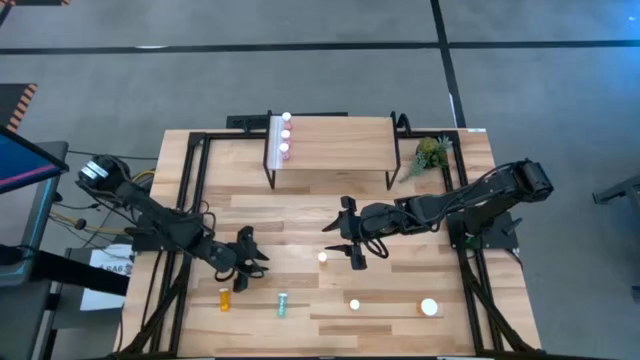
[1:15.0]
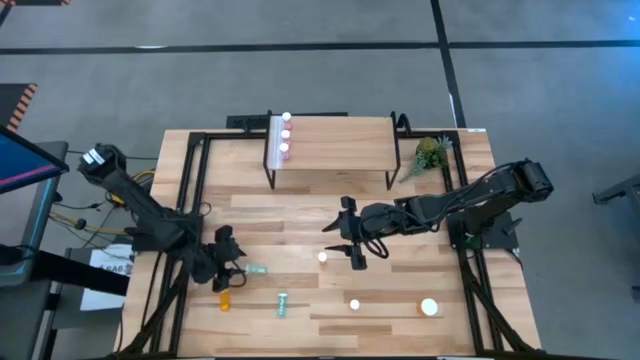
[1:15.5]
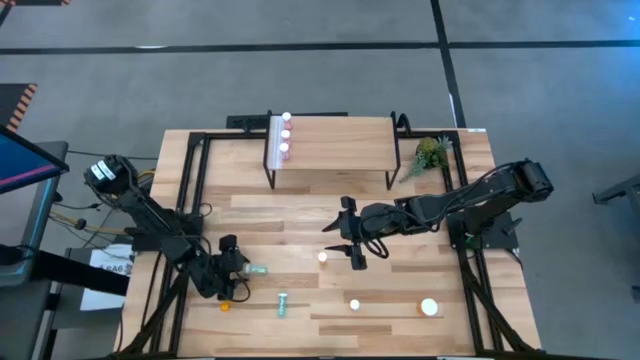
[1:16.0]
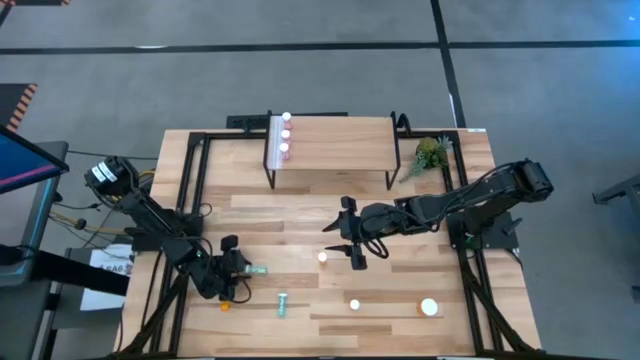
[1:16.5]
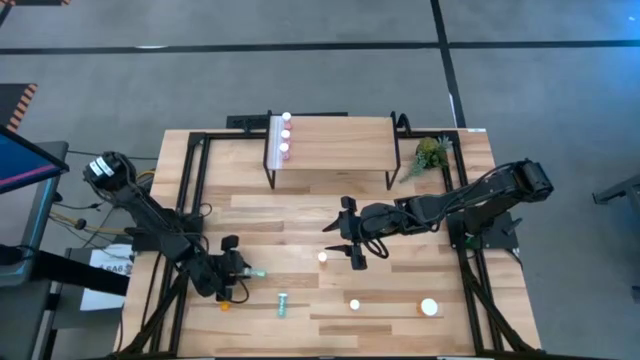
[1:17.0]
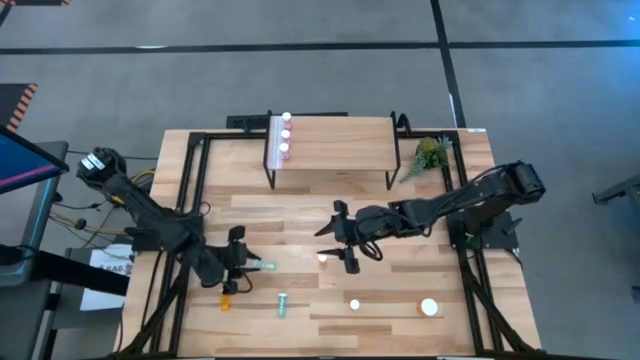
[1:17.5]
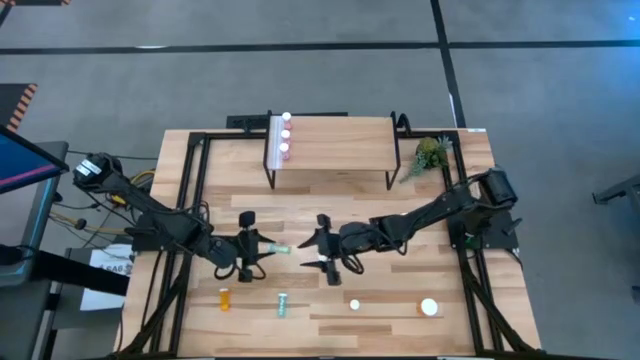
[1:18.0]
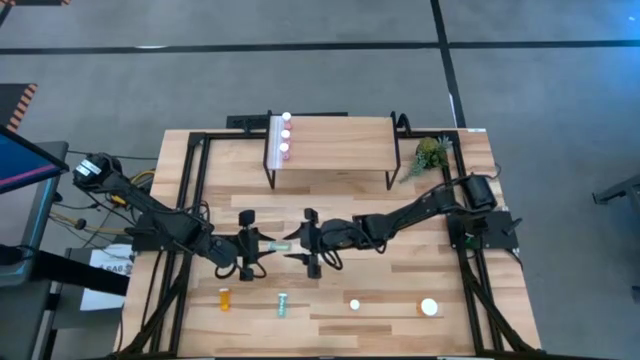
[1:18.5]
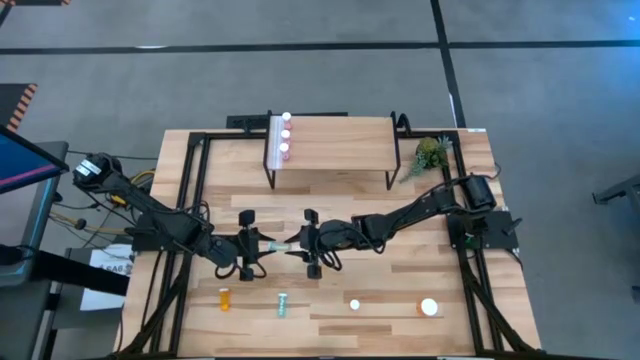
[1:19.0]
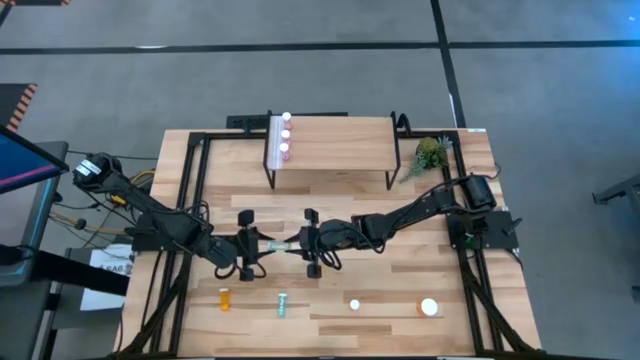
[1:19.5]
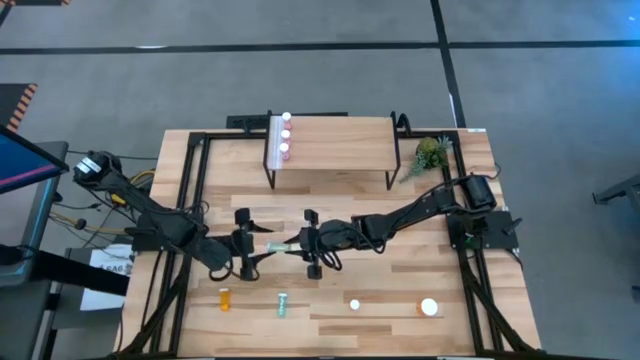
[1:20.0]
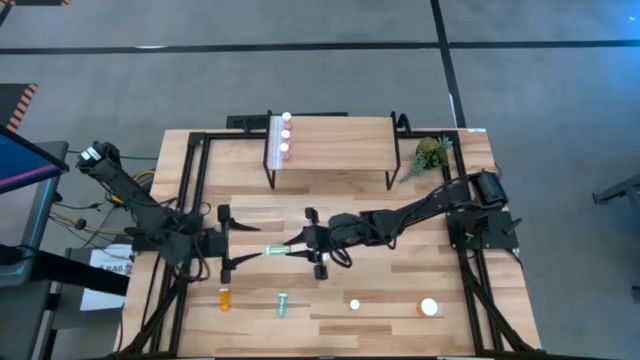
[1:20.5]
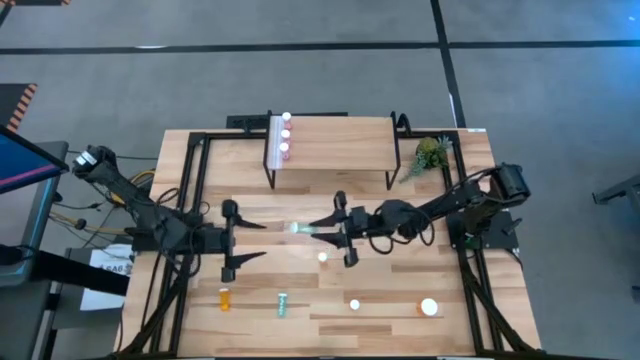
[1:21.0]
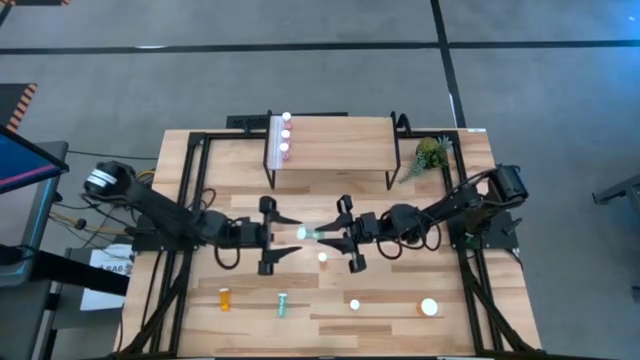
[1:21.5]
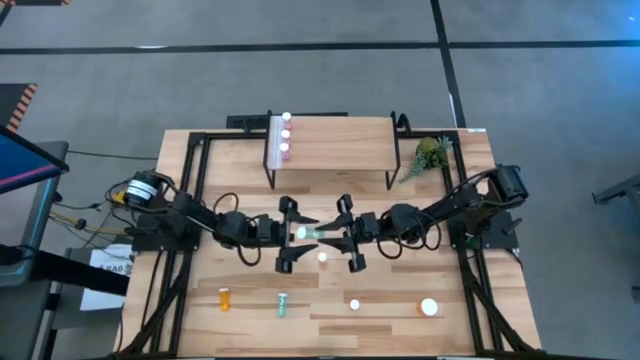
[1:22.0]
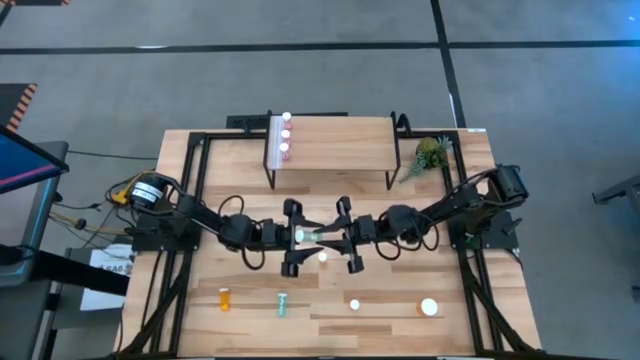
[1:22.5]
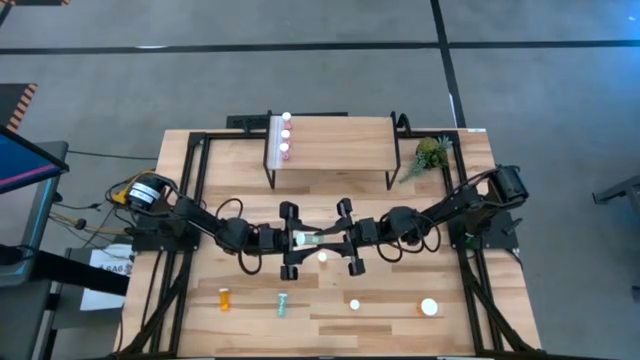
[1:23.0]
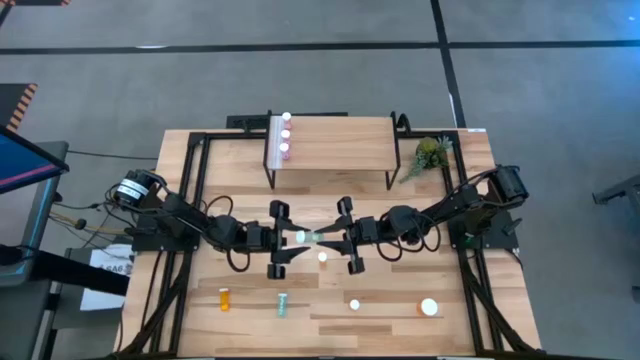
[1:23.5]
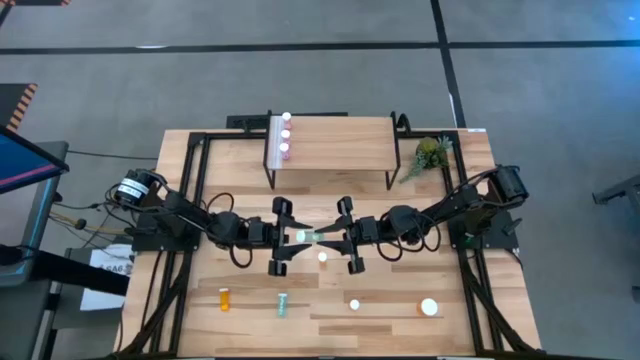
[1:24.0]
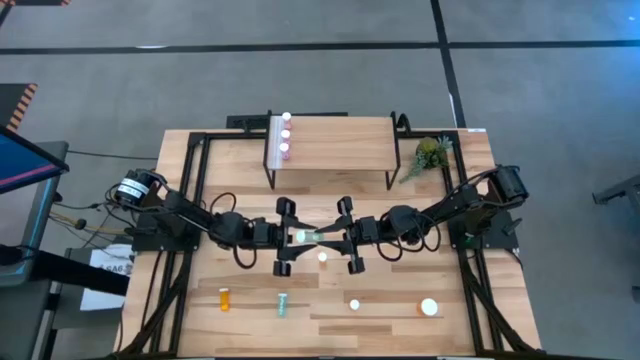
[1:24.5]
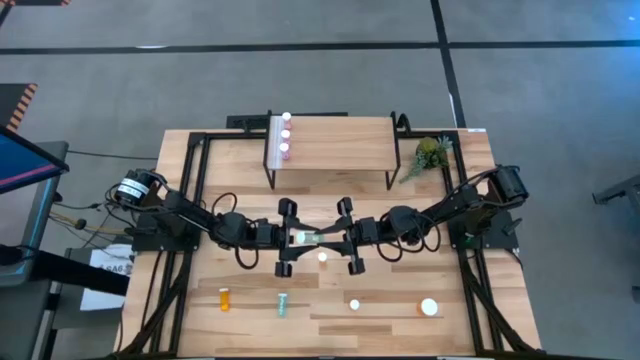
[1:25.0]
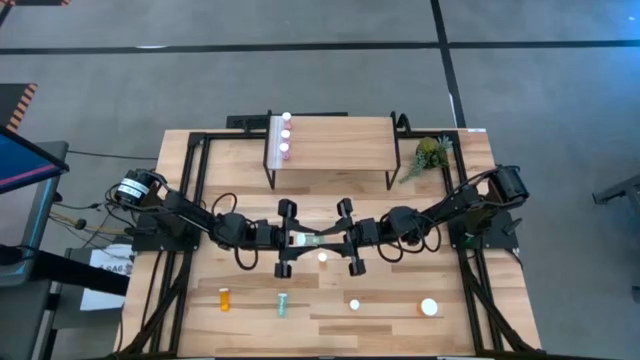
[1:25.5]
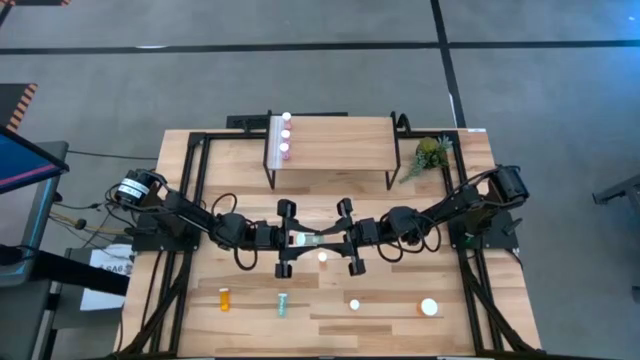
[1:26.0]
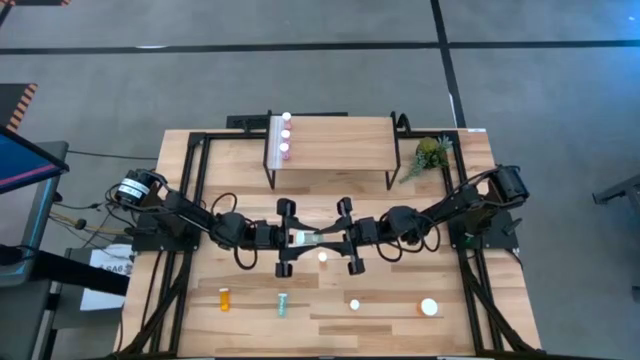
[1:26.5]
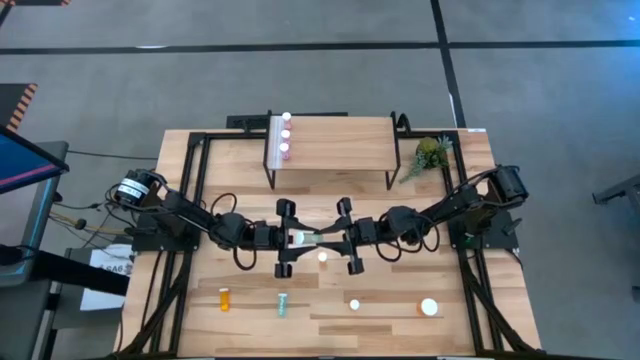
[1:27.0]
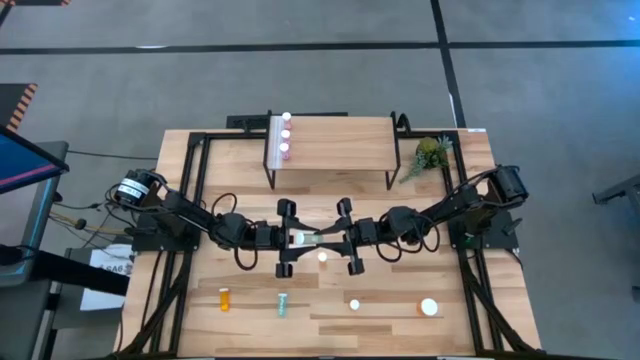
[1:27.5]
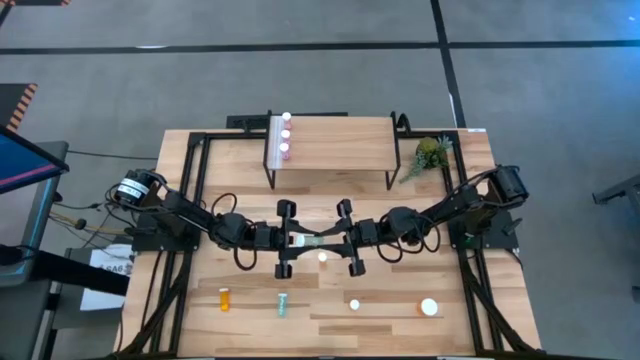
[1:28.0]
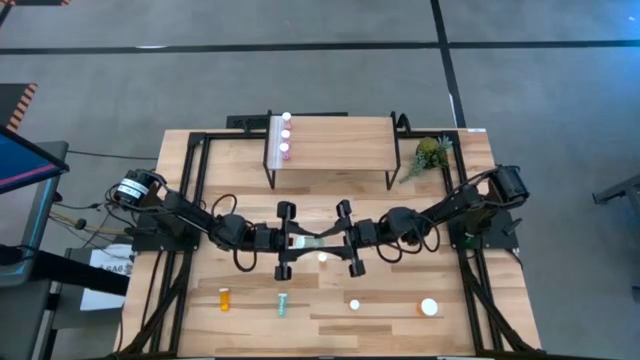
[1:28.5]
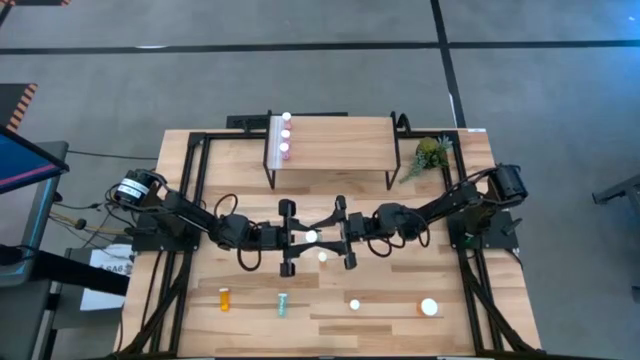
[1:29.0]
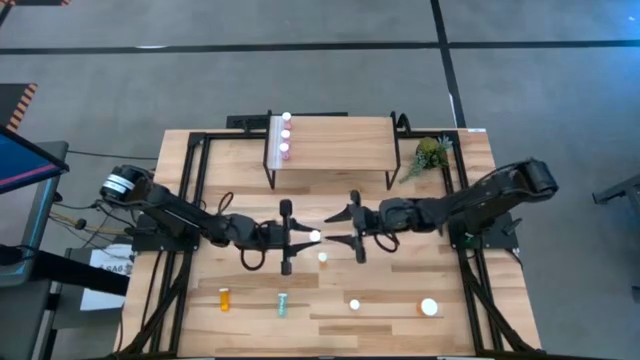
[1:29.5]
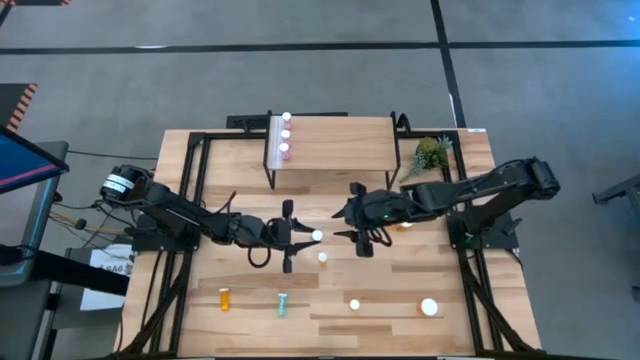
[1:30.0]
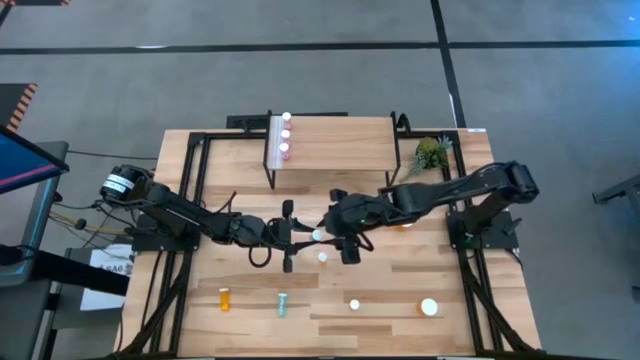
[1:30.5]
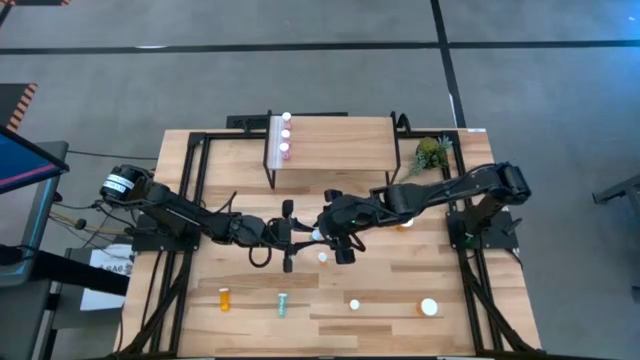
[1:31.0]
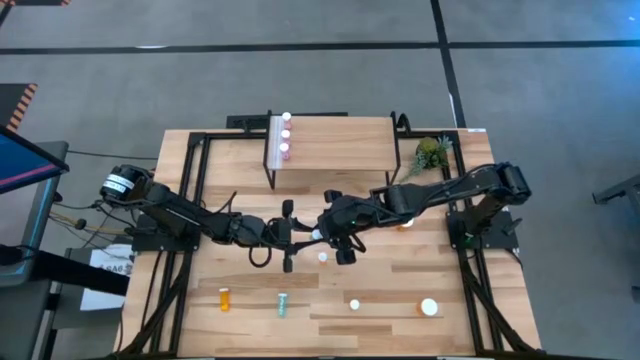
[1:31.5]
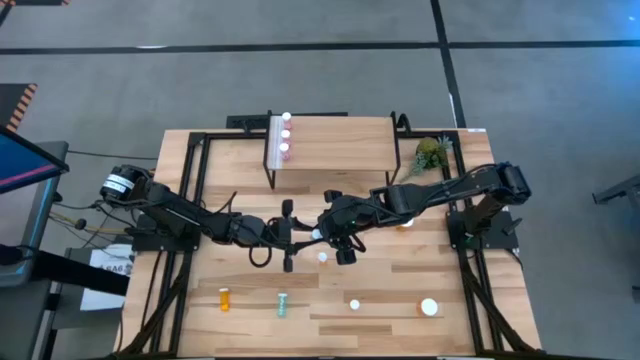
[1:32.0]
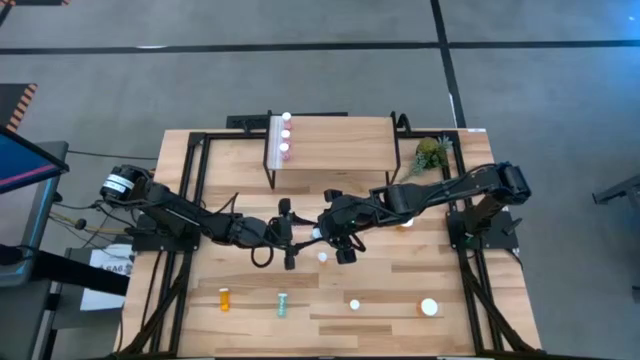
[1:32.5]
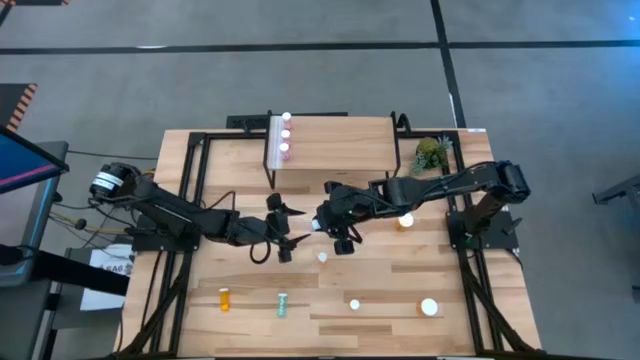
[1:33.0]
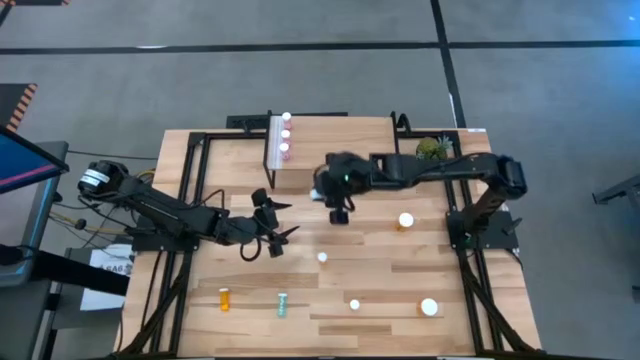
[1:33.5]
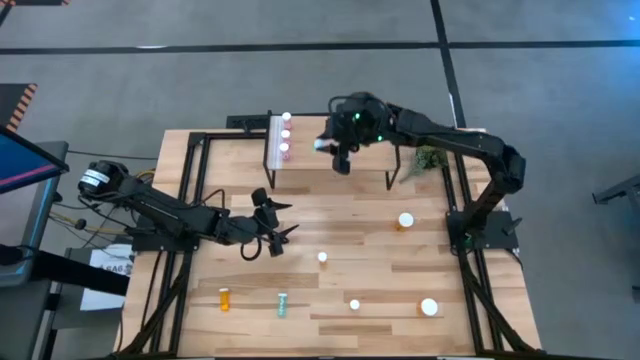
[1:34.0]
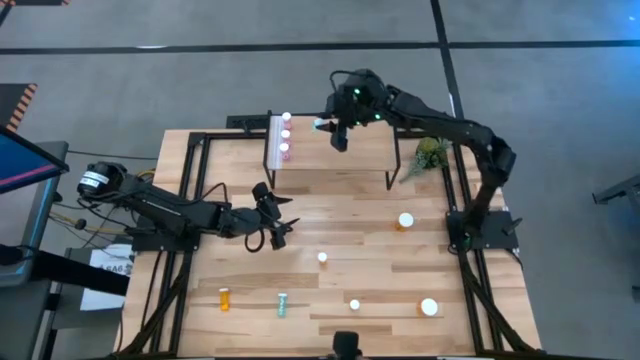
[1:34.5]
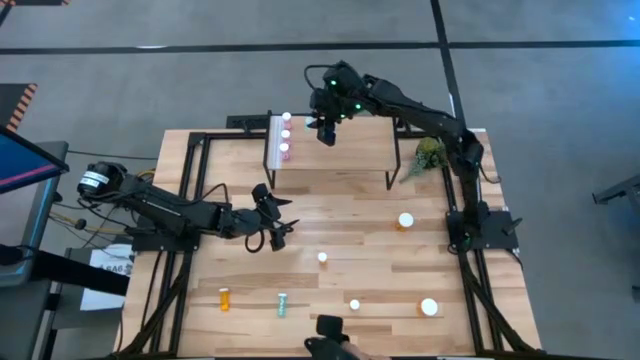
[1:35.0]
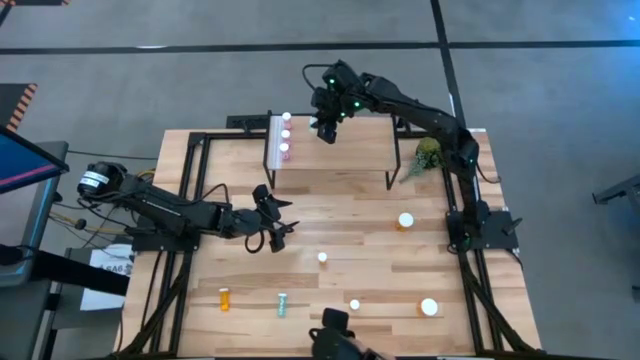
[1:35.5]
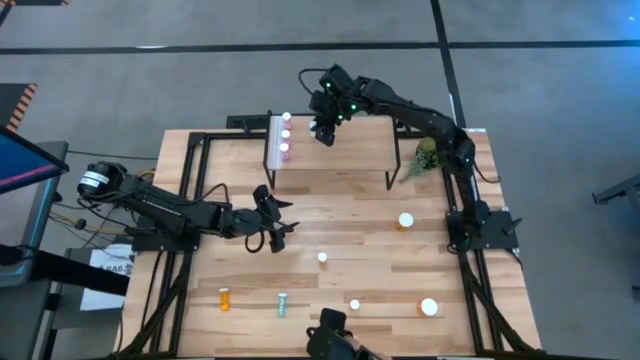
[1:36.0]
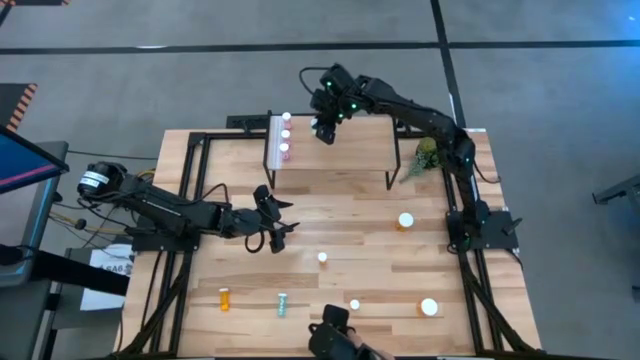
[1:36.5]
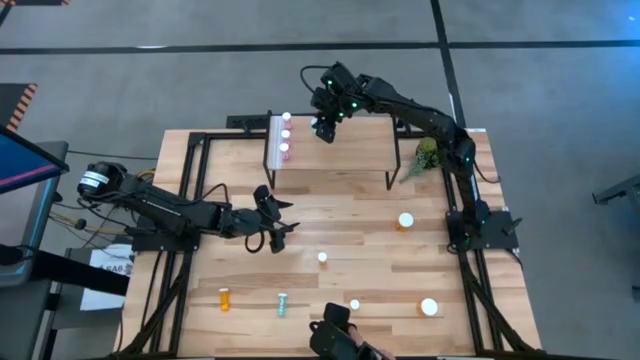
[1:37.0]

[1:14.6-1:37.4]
Task: Pick and place medicine bottles onto shelf by color
Put the top green pill bottle on the shelf
